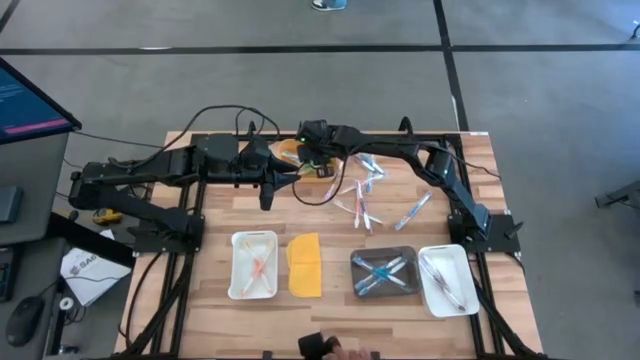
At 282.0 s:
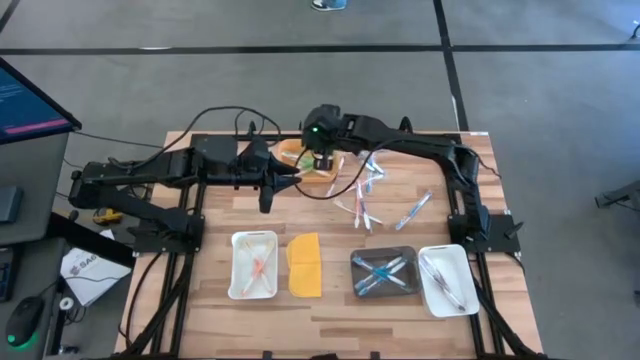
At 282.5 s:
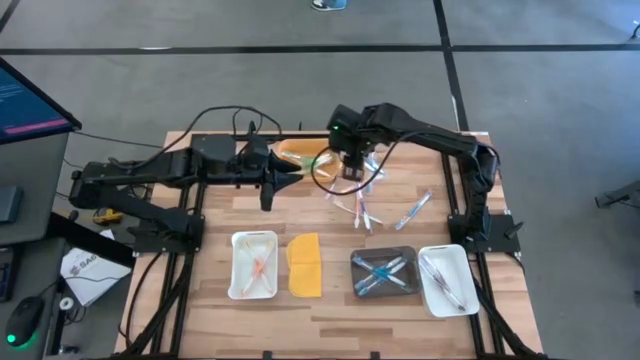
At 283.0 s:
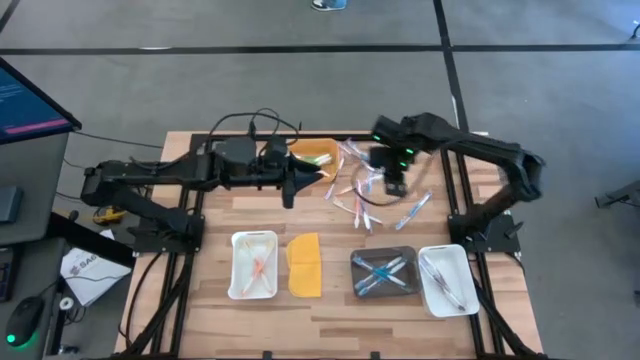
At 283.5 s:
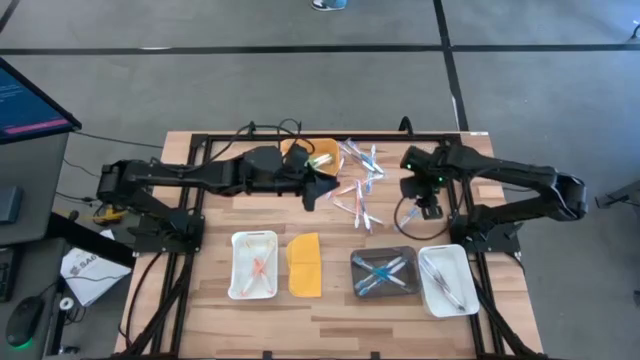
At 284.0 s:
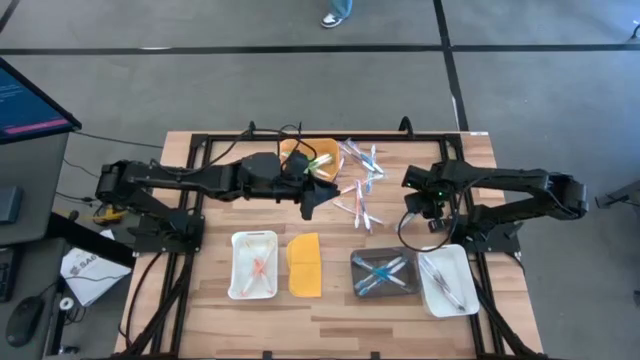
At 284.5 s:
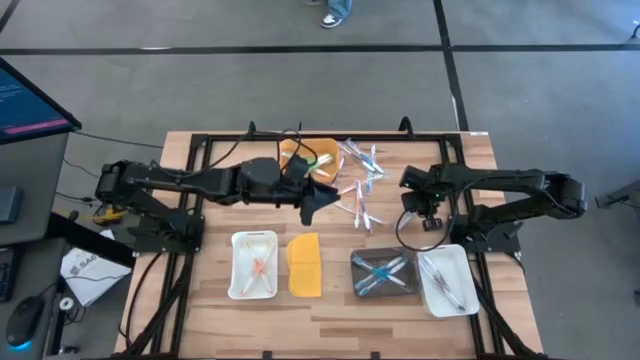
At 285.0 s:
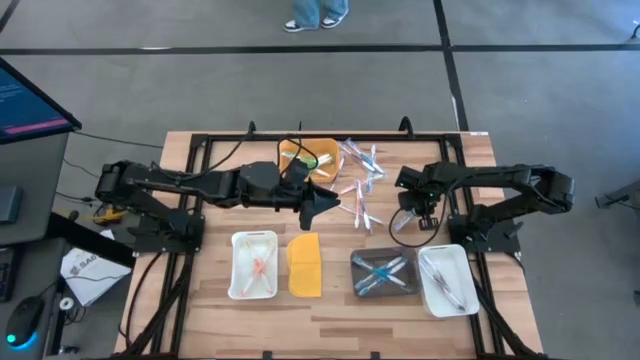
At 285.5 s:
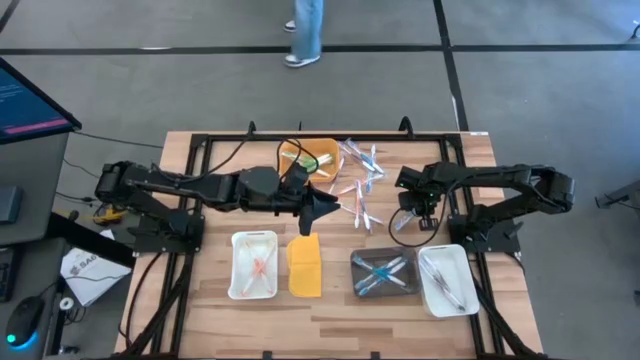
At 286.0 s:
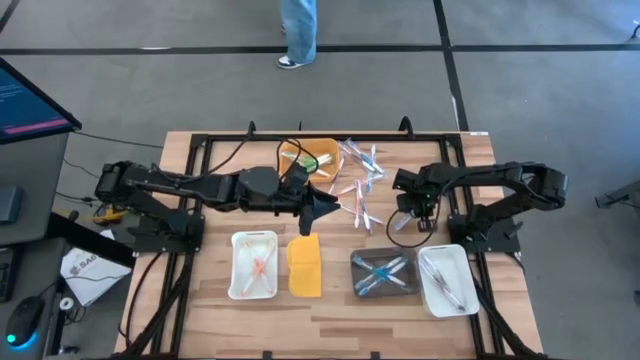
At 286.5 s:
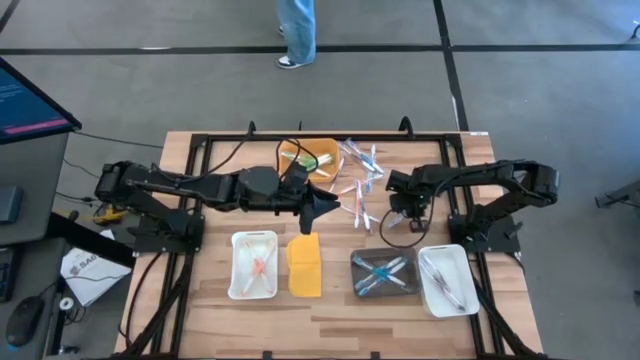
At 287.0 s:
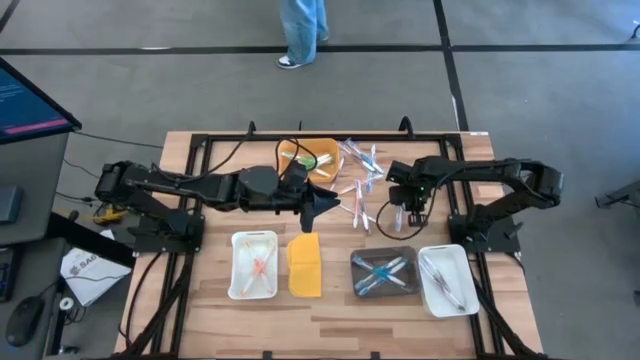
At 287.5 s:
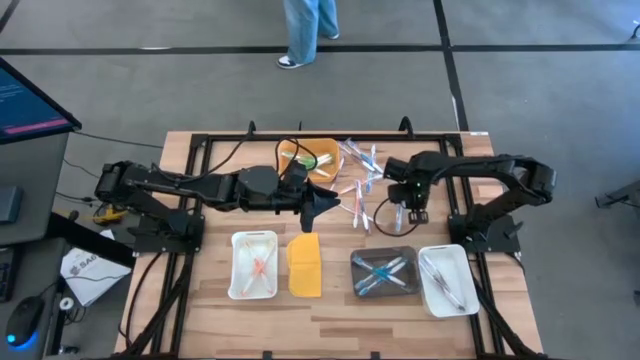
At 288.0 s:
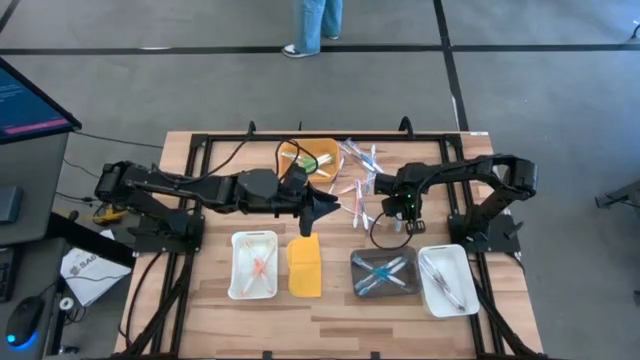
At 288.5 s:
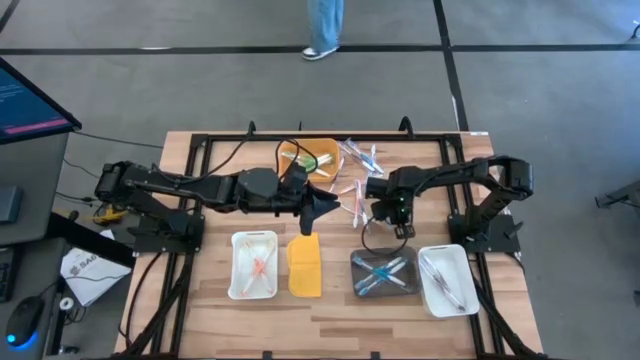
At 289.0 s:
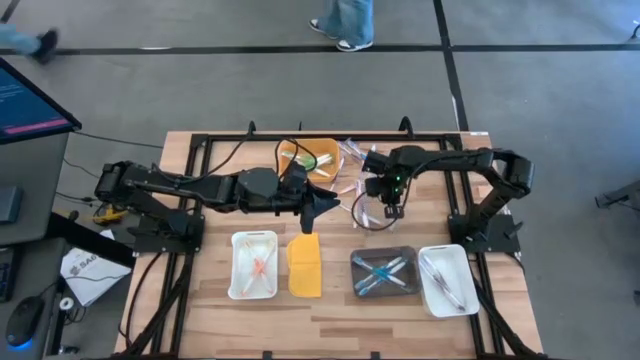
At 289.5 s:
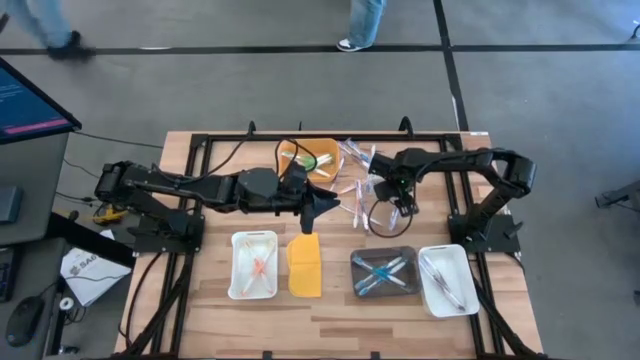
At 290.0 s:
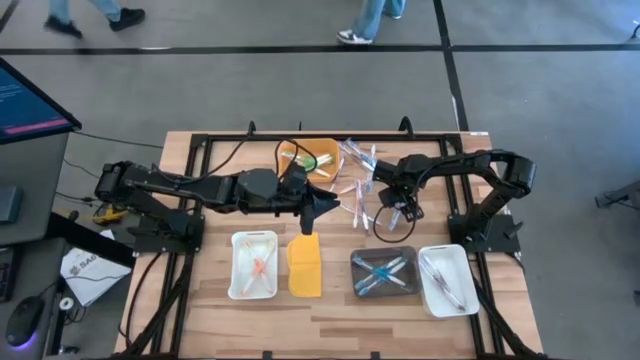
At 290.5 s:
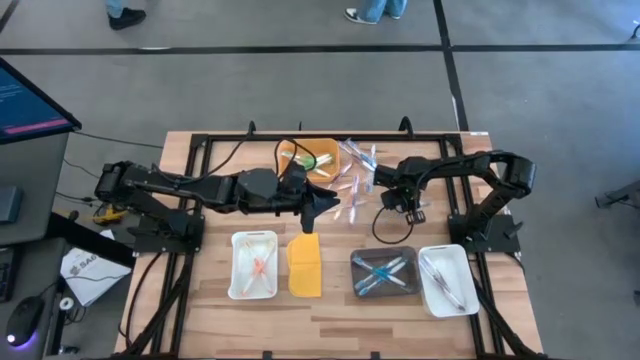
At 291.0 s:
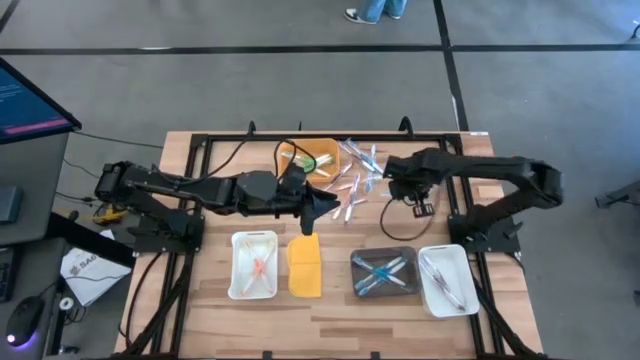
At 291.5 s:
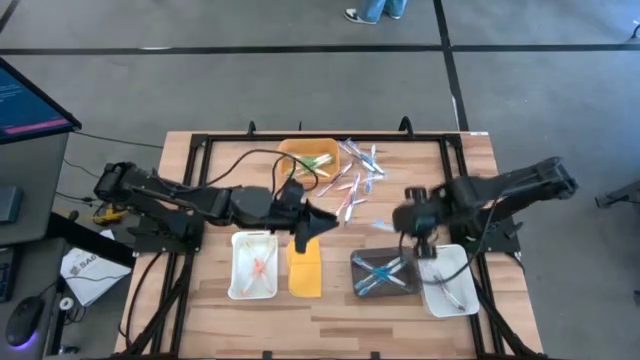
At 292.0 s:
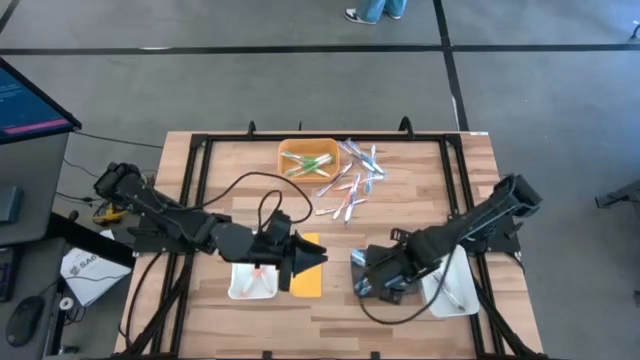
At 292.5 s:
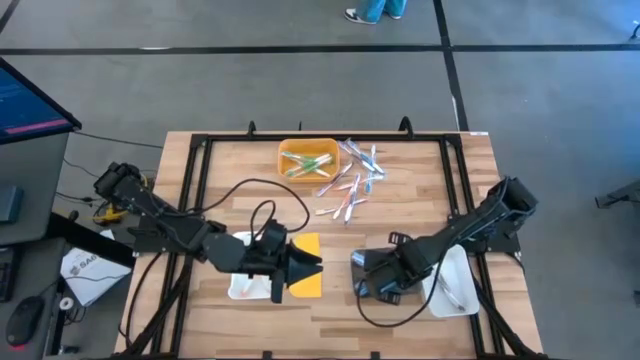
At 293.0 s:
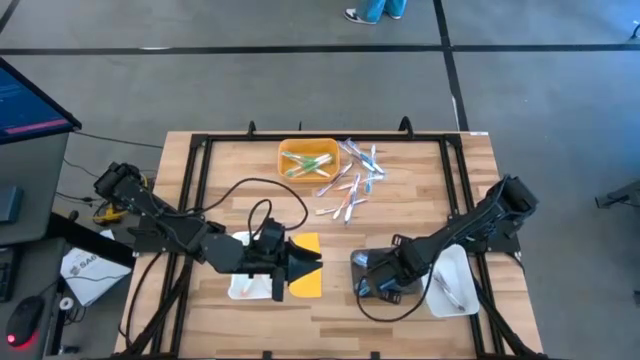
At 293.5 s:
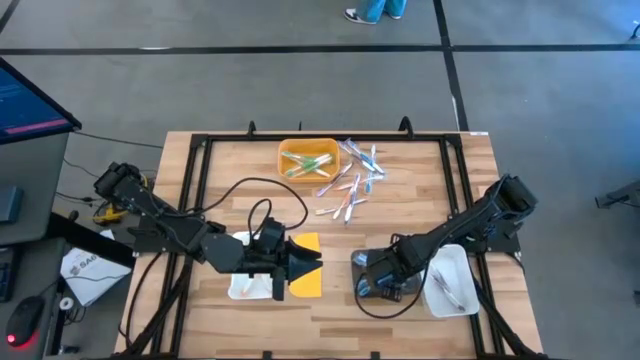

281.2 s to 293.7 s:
Task: Pick & Place Toothbrushes
Put the blue toothbrush into the black bin

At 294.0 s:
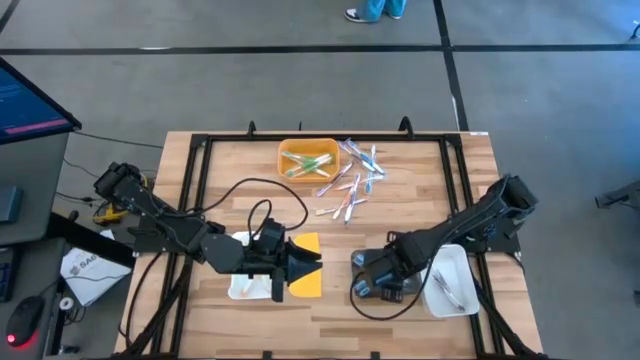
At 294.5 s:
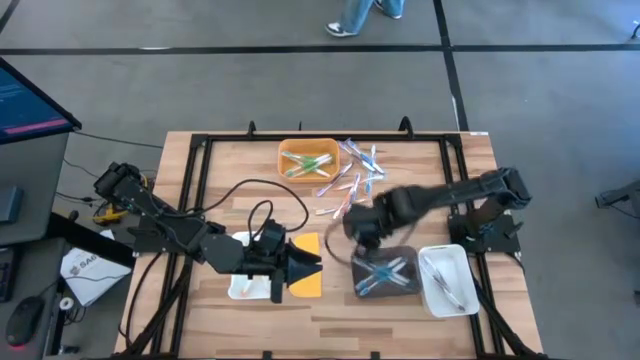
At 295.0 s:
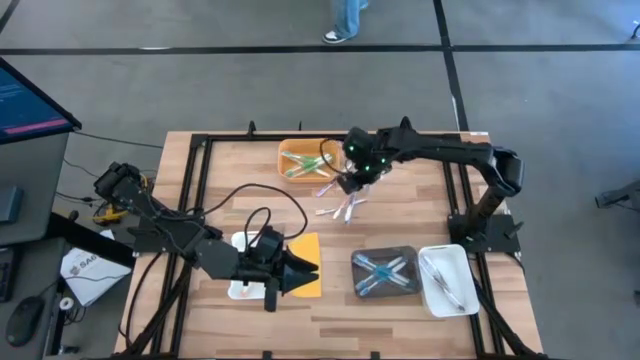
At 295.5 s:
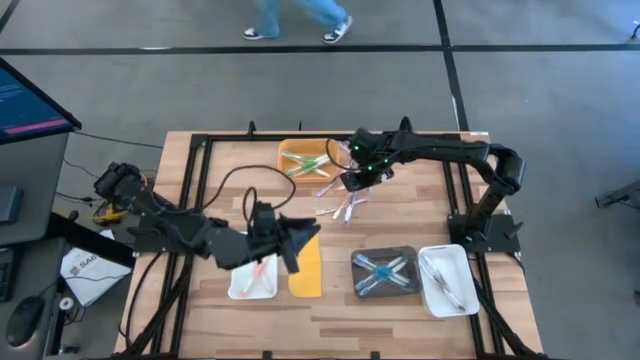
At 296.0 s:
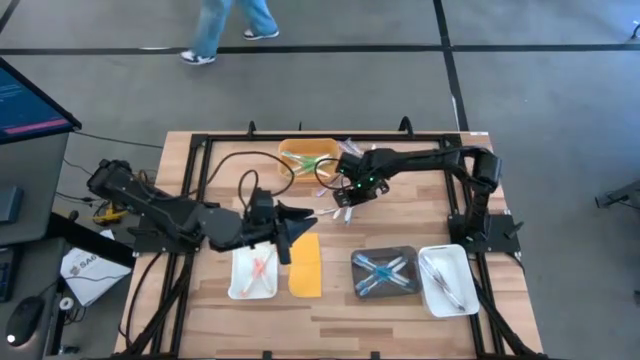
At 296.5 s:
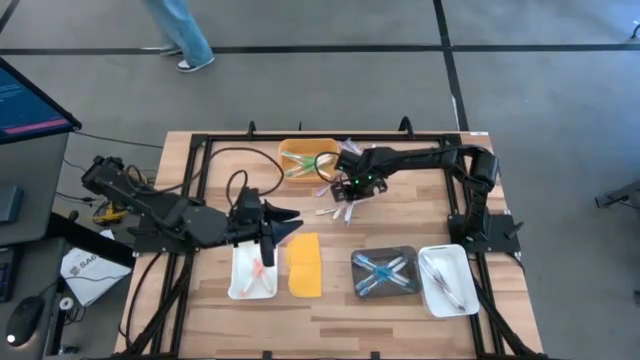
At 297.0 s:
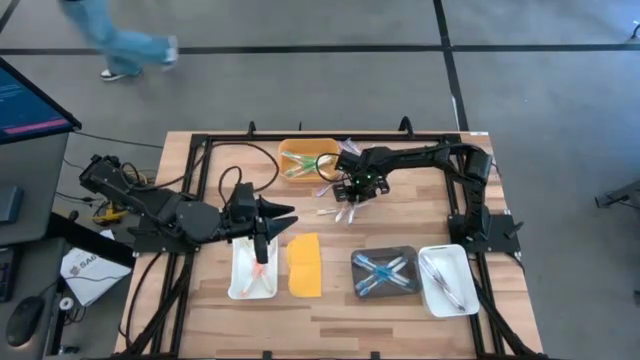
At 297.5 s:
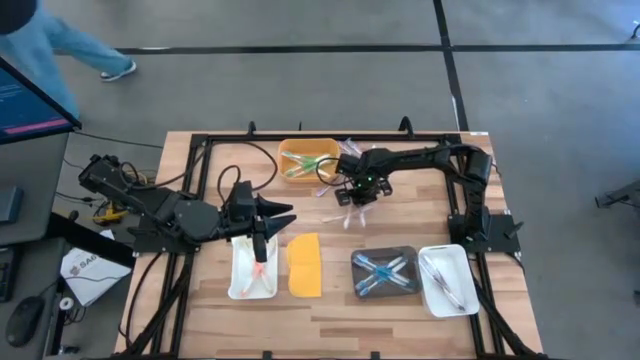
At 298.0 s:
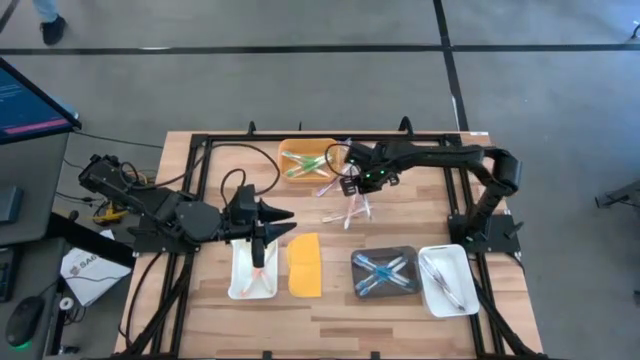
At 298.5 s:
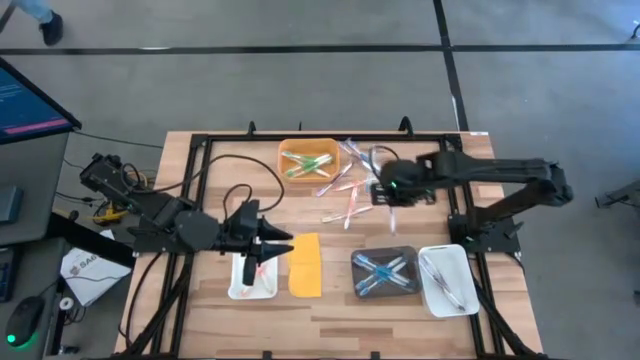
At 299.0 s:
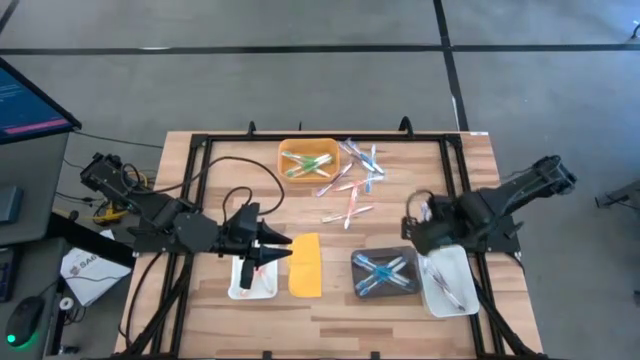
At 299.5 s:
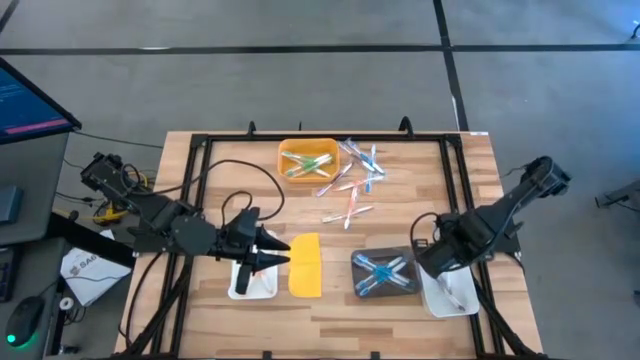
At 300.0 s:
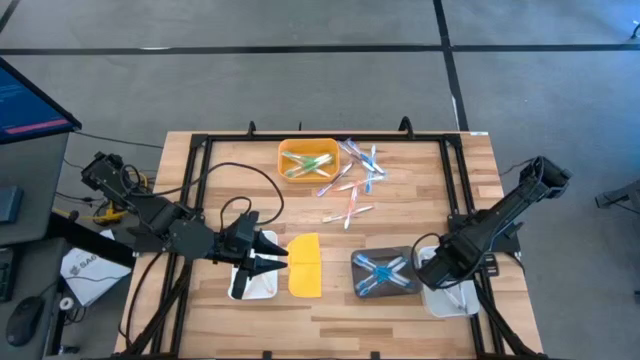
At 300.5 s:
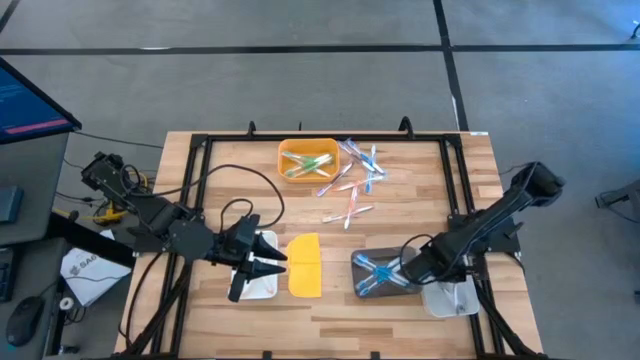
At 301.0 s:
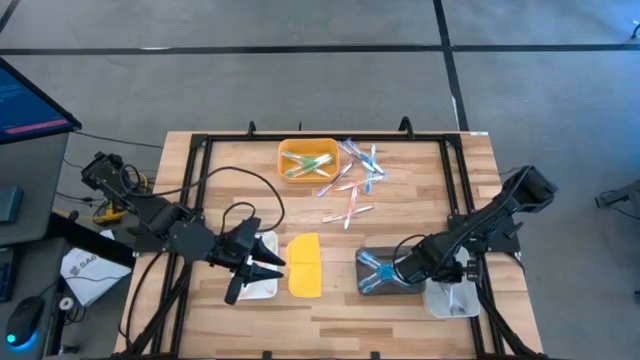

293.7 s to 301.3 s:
Put the purple toothbrush into the right white bin

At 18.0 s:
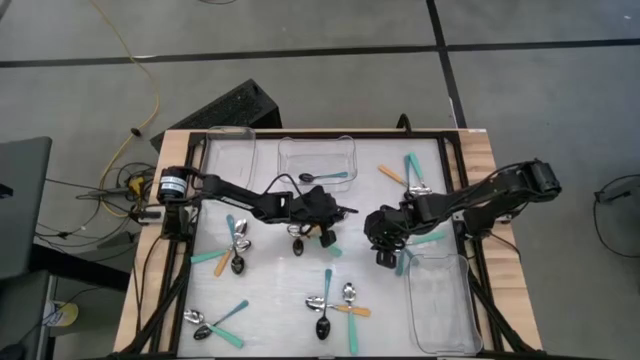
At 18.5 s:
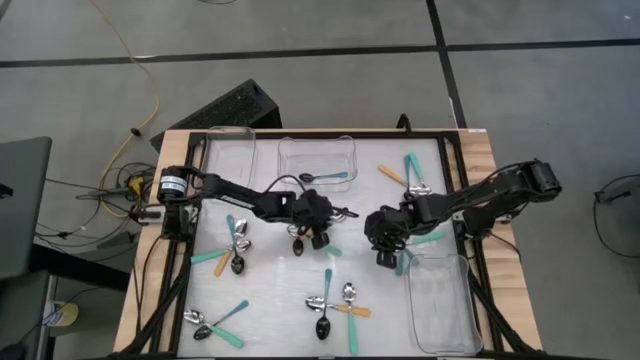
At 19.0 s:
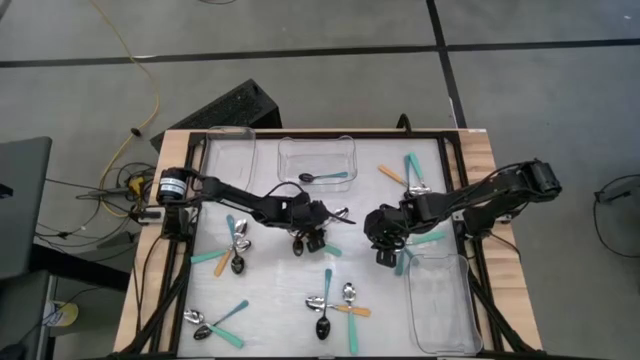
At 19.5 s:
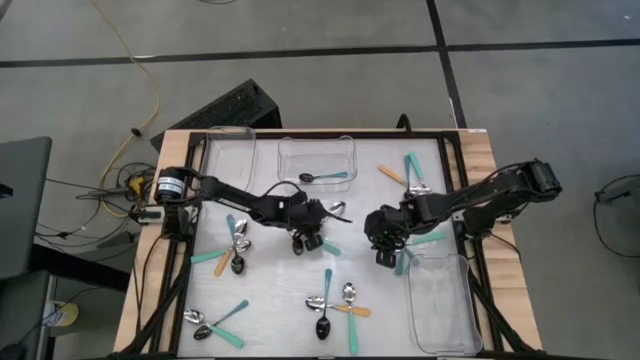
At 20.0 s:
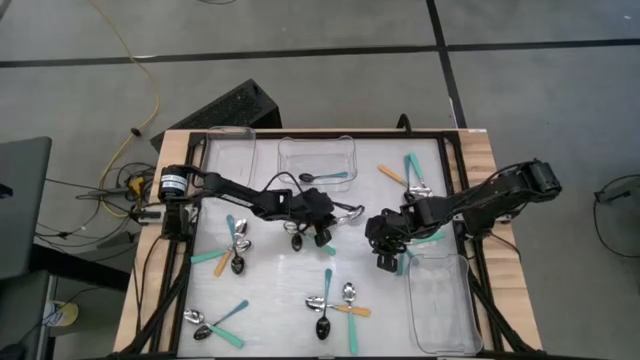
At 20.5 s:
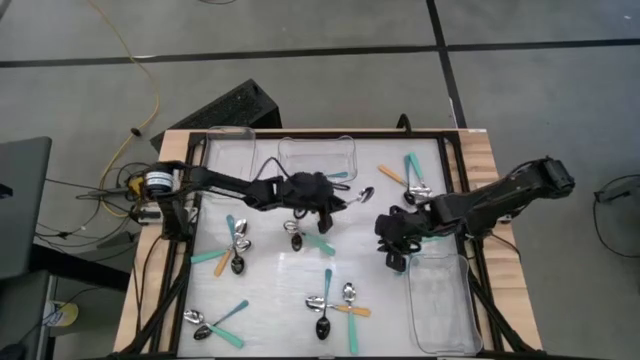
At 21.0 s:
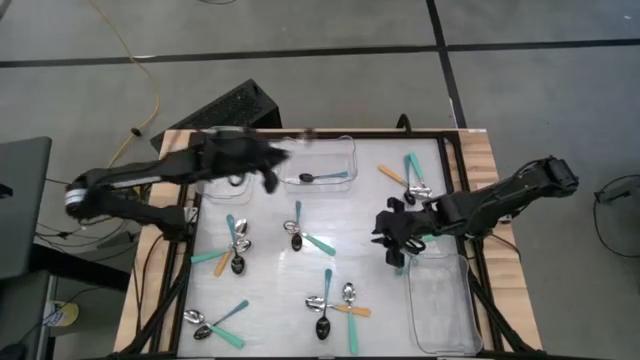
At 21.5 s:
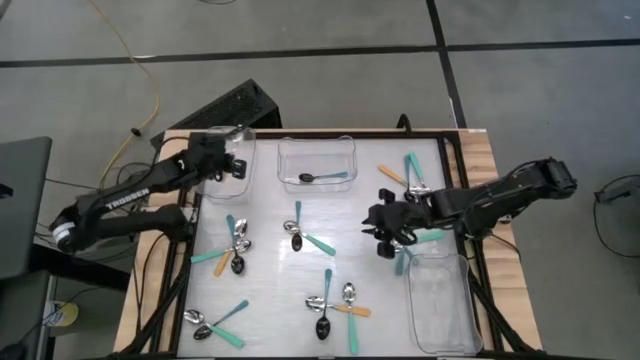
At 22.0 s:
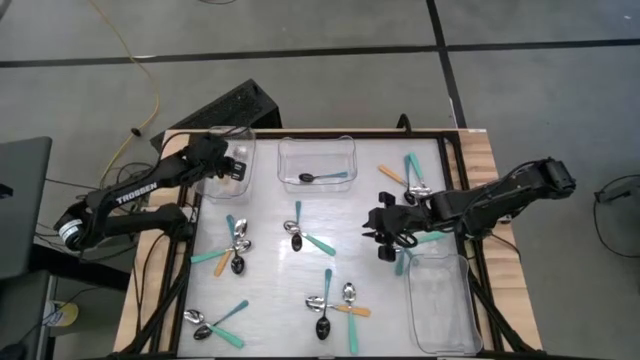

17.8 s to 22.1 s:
Task: Sort silverware by color (type)
Put the yellow spoon into the top left transparent bin
